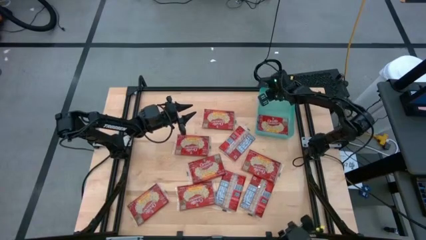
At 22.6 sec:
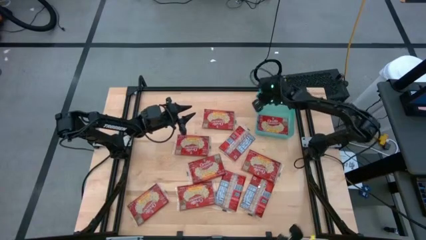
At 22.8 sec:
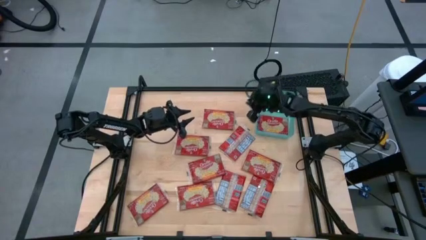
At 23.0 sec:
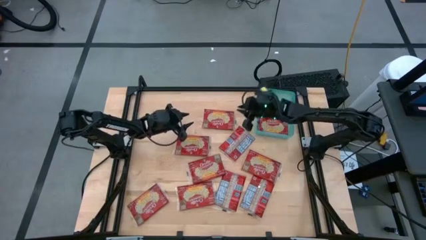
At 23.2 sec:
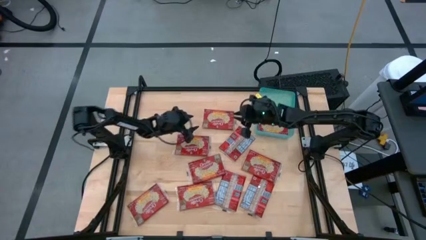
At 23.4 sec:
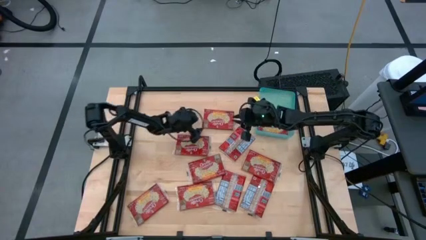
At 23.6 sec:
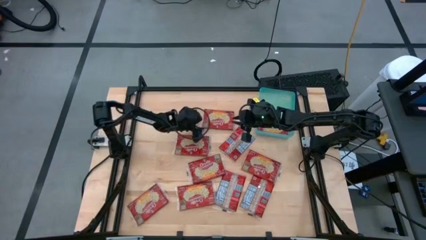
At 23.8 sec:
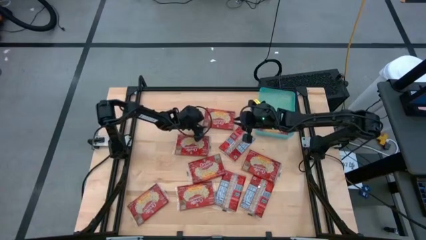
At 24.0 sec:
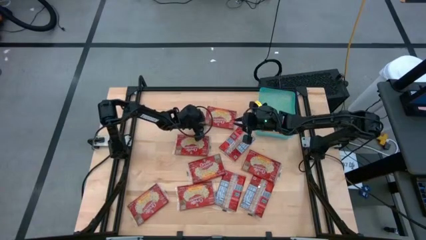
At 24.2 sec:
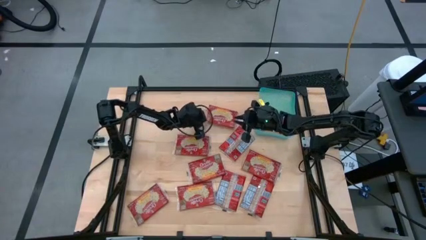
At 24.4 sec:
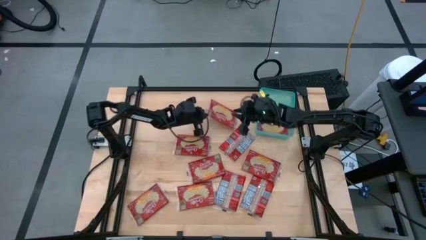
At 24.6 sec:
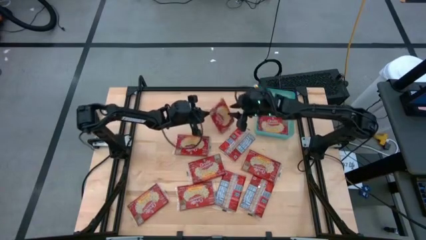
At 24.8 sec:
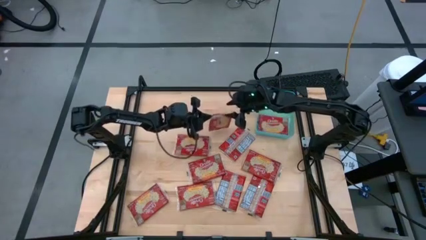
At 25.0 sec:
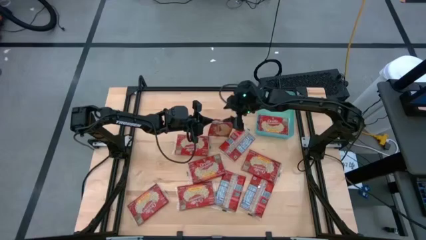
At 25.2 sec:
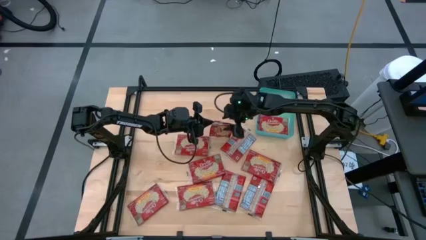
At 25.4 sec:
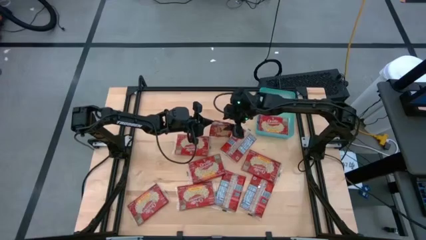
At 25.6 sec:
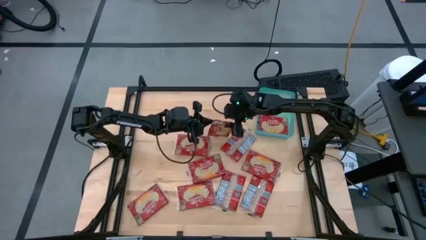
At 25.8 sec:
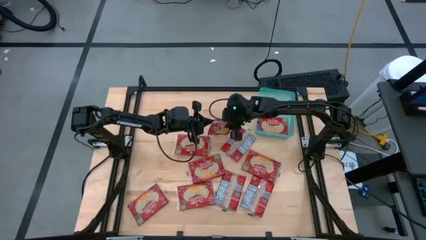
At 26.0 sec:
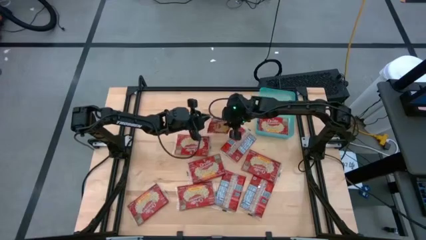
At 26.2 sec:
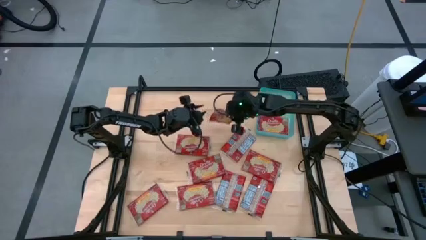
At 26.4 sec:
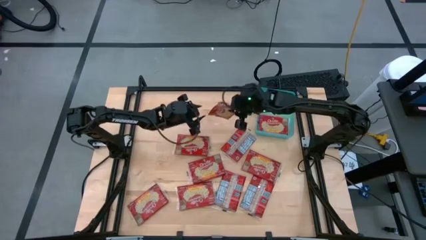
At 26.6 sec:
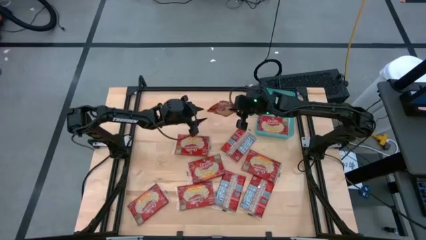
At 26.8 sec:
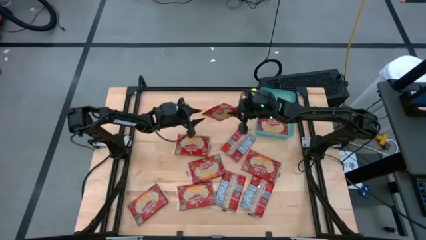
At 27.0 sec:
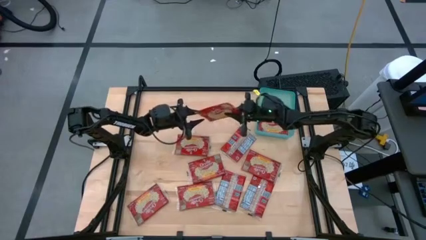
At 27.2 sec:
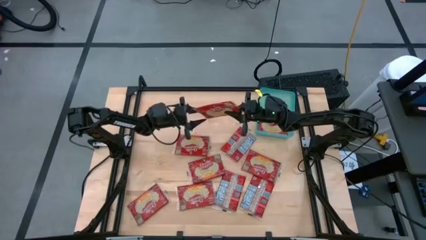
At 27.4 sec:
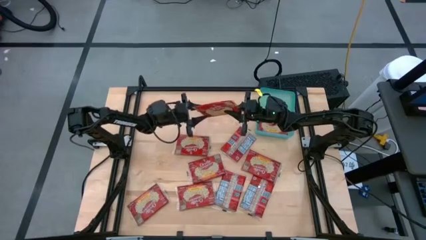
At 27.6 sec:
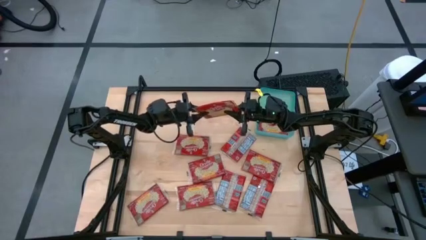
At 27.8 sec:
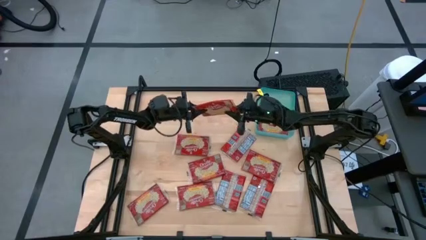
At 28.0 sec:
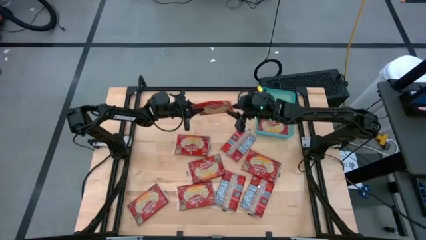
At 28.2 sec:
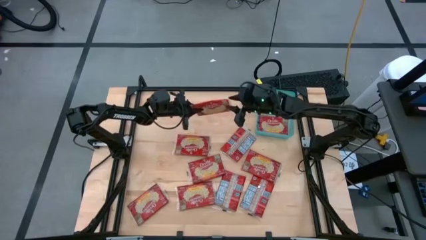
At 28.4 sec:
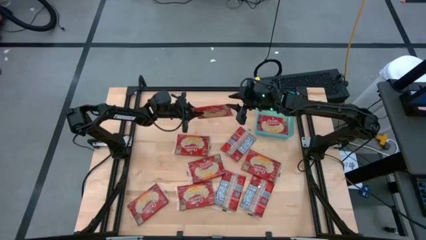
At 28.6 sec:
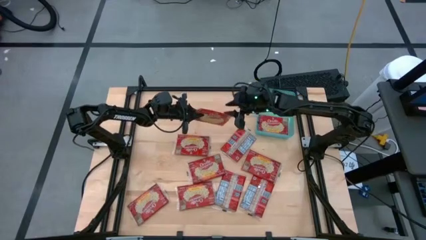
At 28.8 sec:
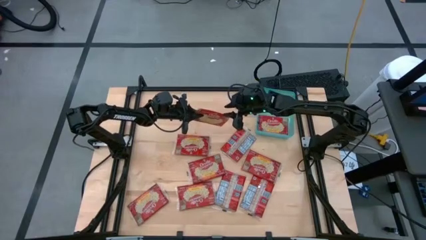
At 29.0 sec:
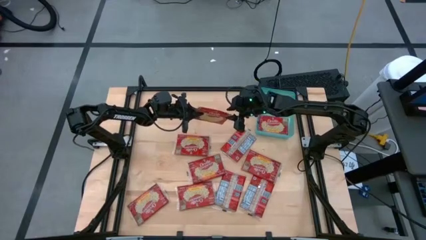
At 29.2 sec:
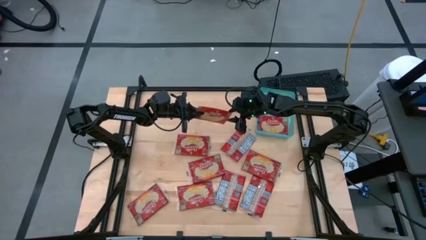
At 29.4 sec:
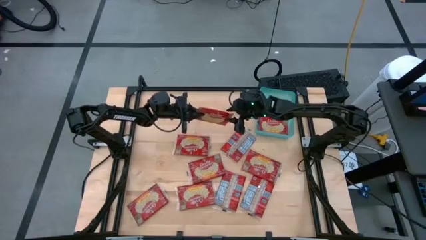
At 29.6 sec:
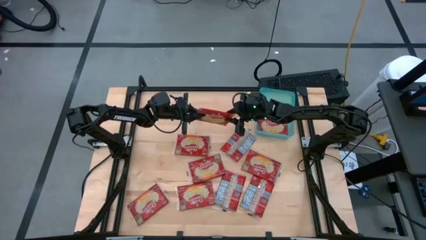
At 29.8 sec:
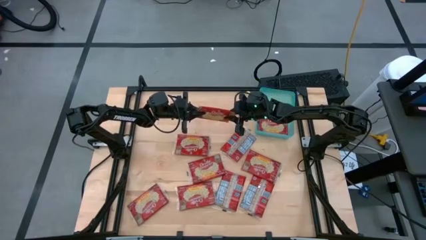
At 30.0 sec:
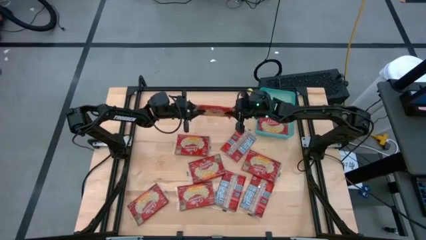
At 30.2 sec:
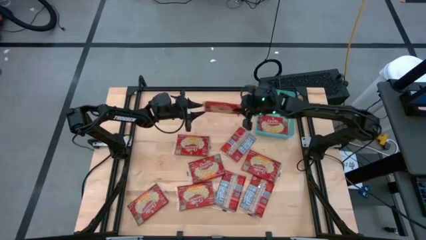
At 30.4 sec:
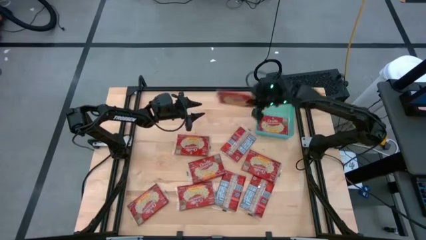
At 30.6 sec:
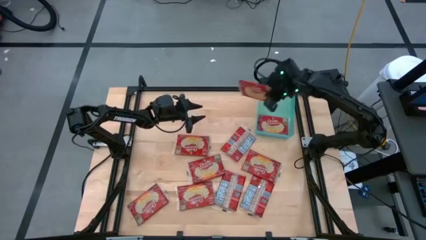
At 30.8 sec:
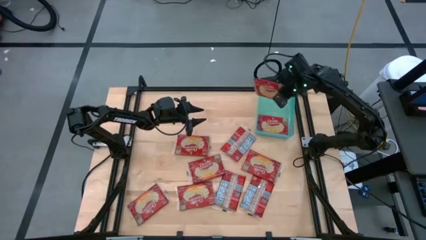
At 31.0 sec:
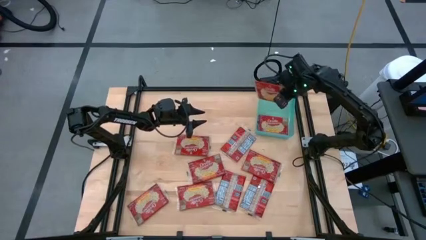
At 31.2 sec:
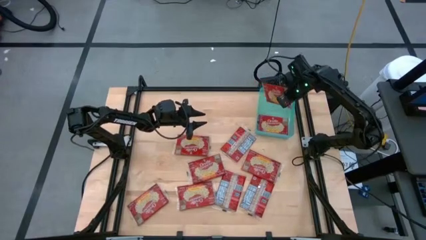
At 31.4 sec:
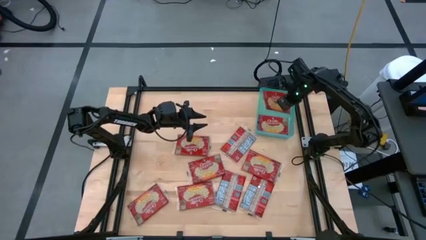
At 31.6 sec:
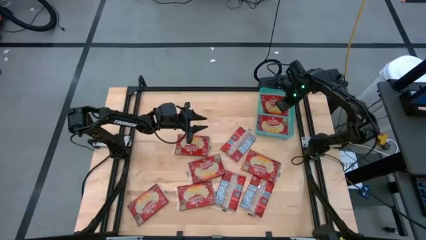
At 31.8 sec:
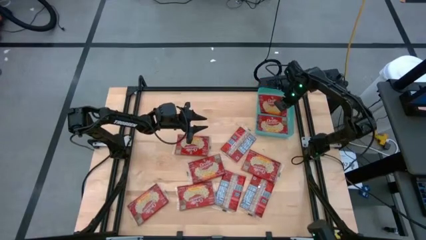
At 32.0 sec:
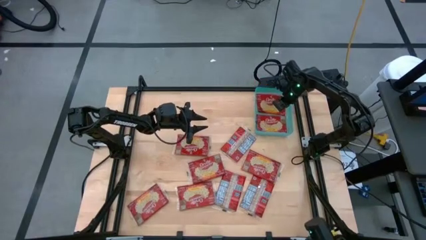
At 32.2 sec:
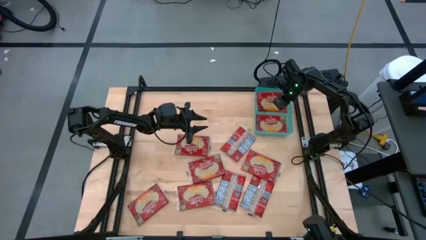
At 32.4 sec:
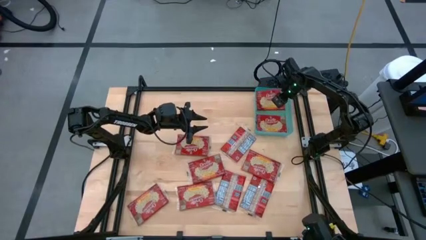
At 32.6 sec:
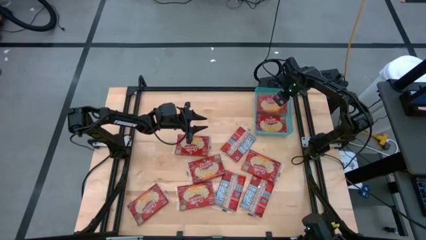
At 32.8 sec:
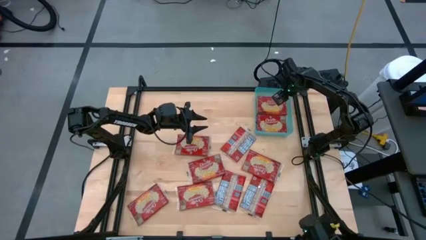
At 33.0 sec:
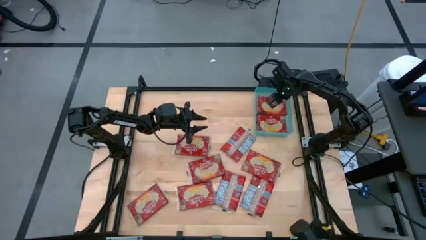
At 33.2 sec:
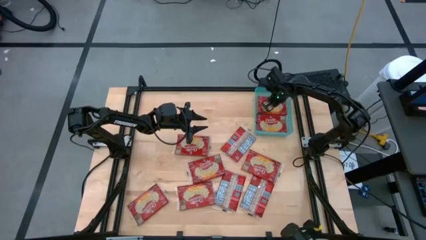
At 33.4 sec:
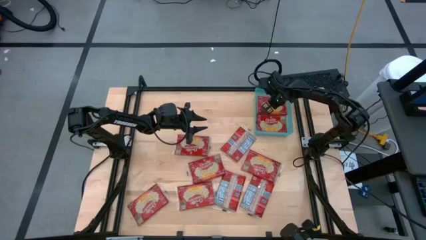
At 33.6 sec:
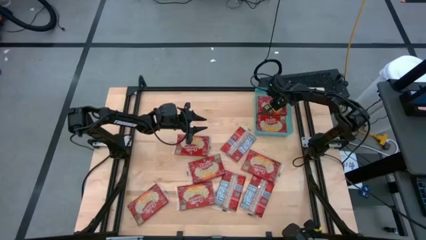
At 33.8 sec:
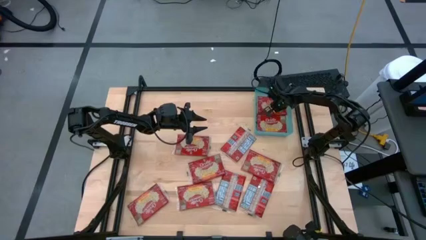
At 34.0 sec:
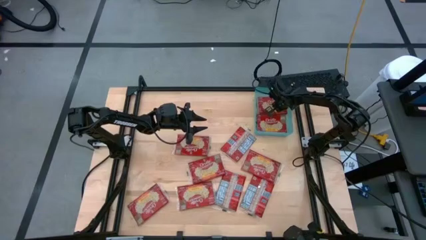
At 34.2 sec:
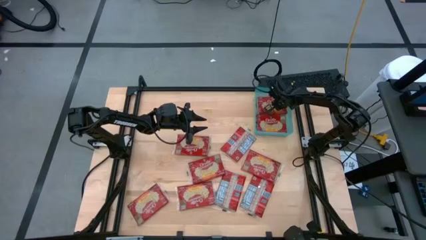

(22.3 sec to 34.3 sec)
Task: Sort popcorn bags into baskets
Put the red popcorn bag into the green bin
